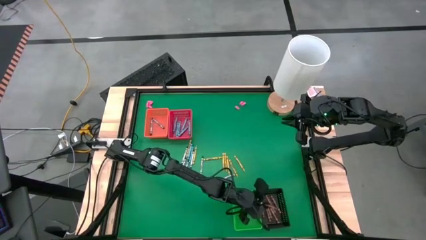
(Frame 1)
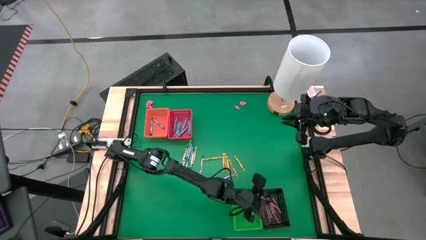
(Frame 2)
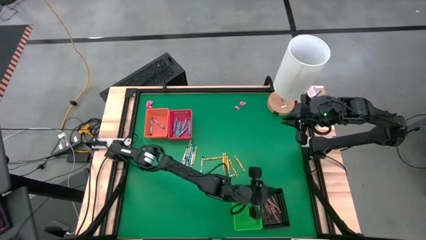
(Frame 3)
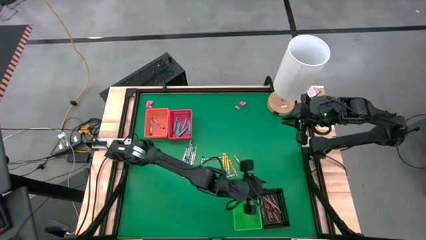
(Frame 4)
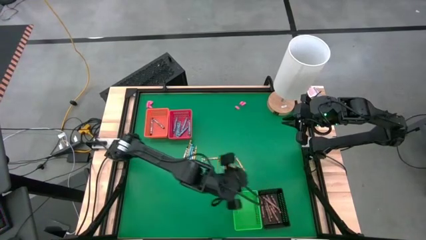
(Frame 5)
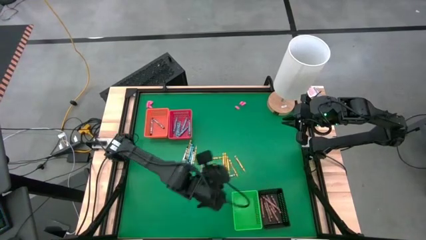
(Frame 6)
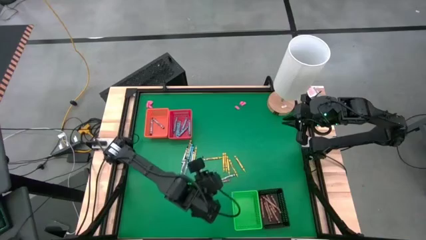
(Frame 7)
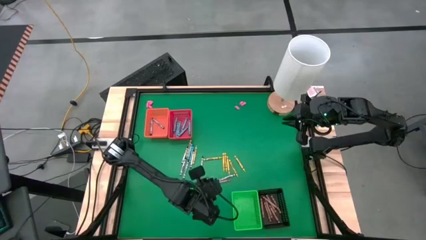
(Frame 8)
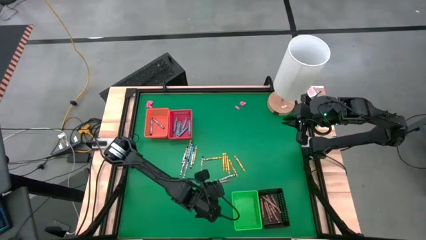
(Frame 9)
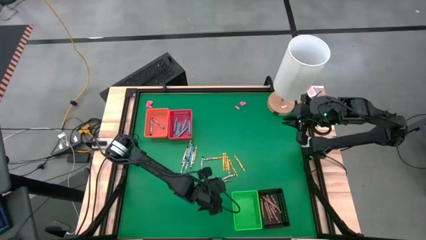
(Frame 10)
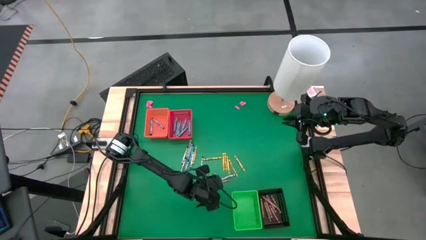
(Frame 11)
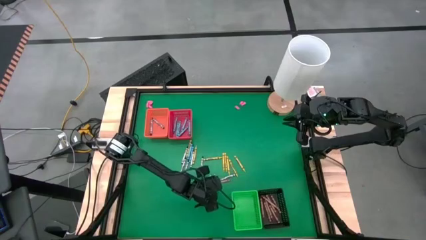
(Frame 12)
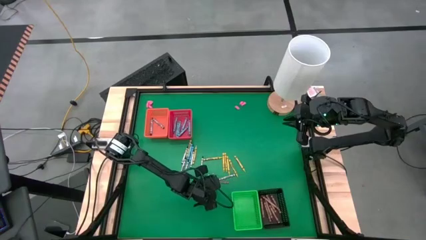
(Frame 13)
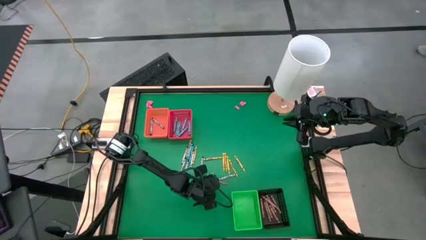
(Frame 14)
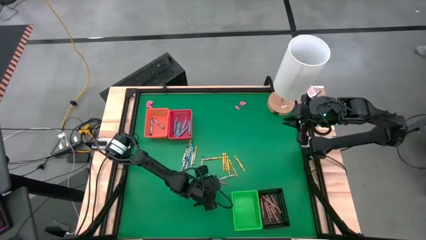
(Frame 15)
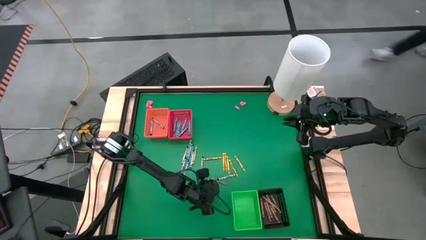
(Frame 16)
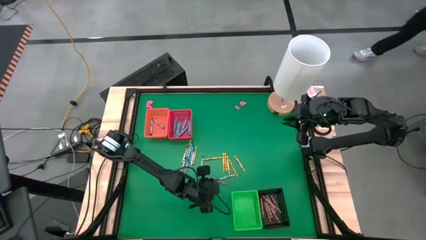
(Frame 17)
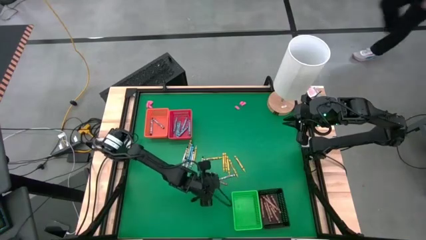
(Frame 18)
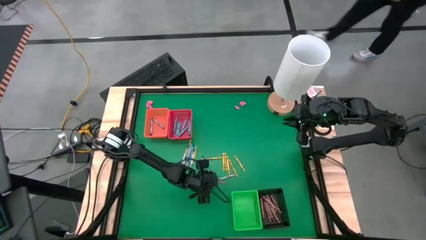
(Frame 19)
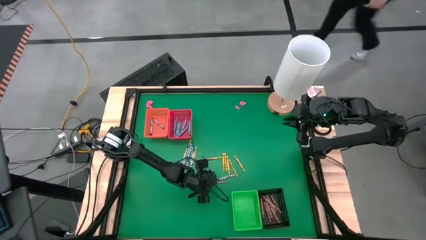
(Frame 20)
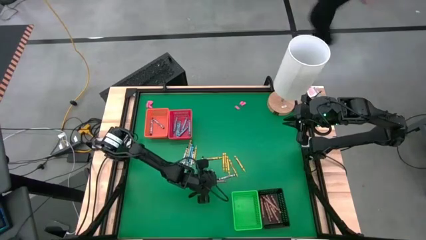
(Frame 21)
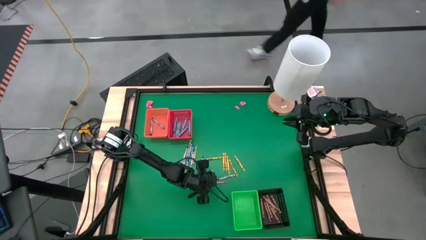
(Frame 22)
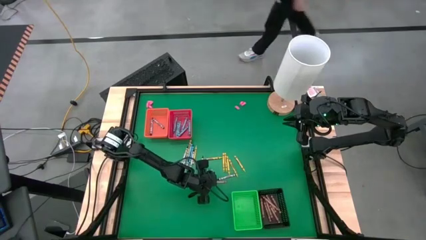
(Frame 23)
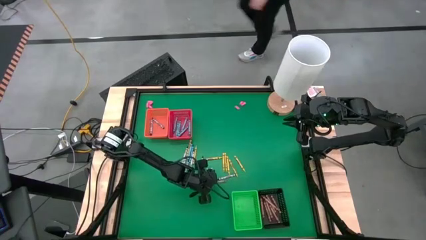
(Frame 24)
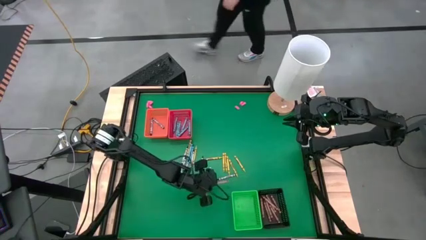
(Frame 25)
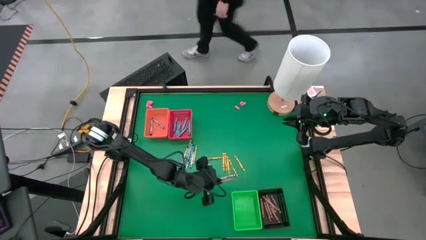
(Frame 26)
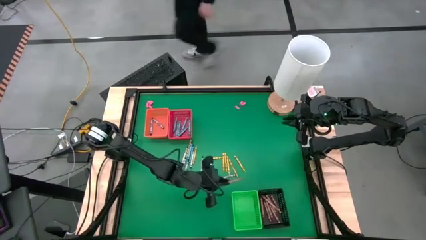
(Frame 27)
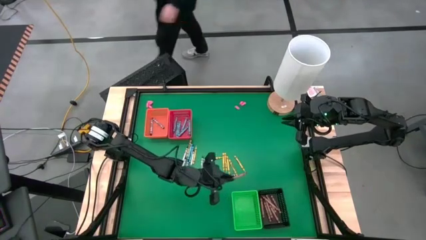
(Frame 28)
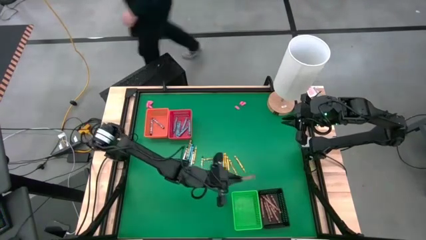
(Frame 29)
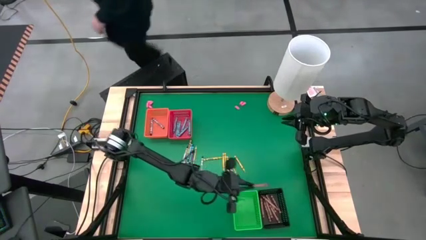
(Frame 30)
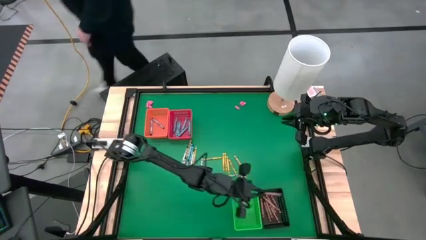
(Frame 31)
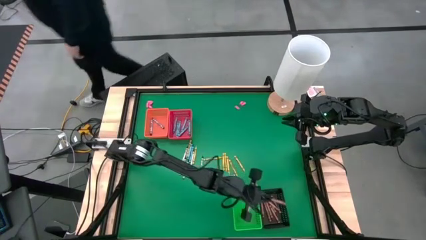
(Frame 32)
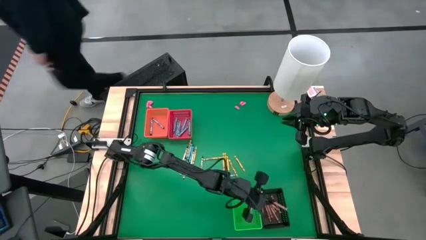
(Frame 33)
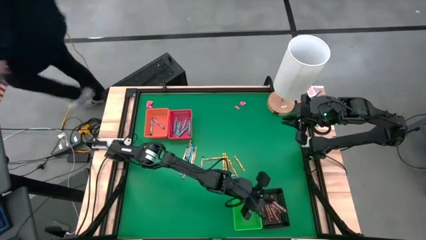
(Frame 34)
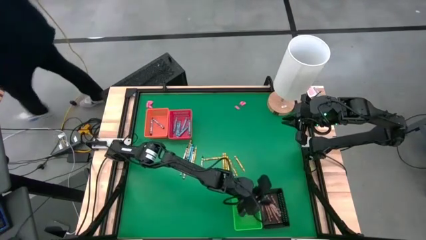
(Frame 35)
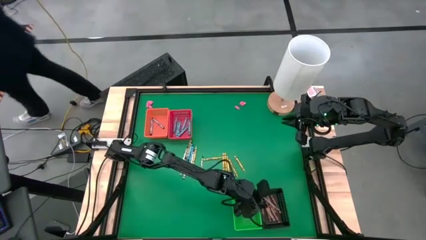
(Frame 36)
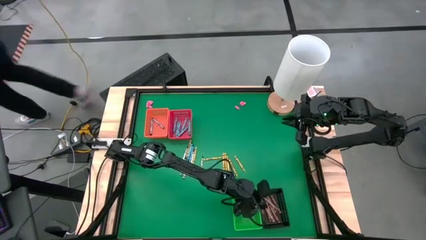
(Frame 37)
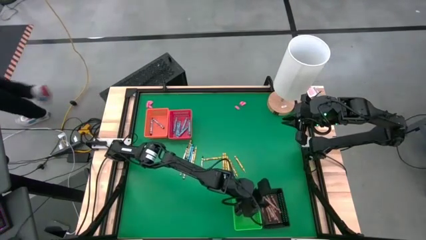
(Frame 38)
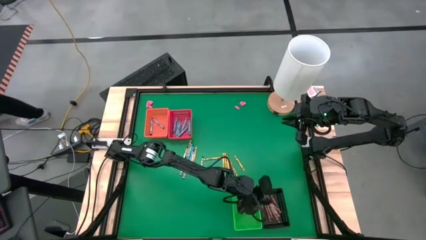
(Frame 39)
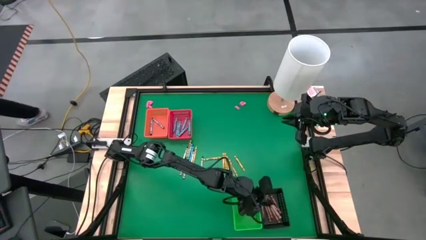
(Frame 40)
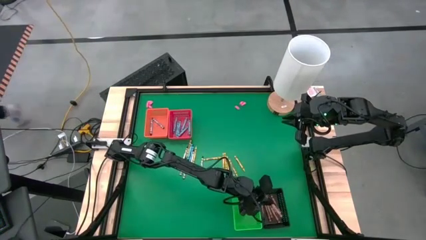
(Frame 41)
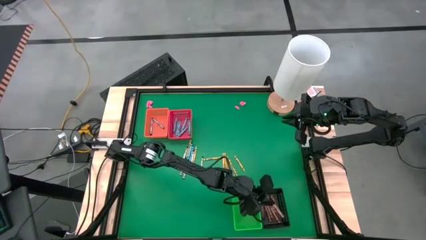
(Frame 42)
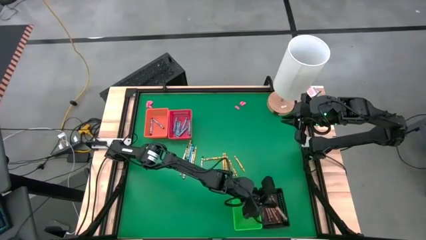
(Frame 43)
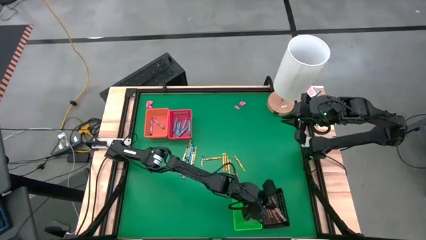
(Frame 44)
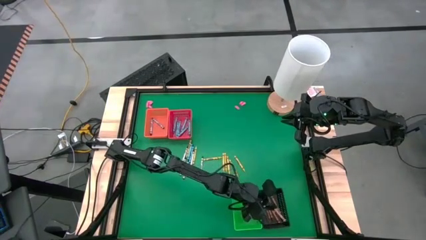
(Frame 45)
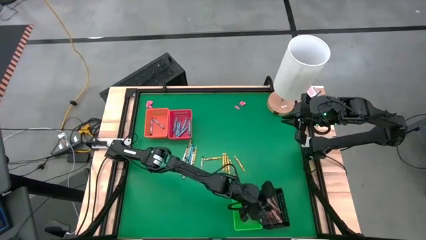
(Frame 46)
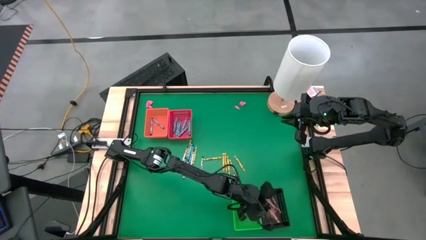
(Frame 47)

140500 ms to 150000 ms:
Task: Sort crayons
Put the brown crayon into the black bin

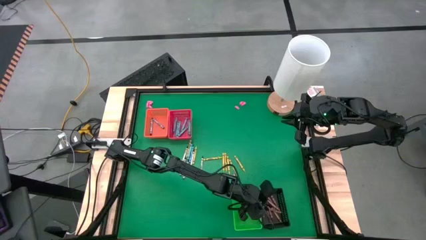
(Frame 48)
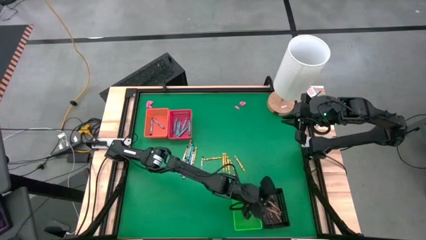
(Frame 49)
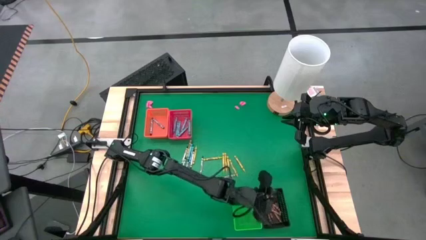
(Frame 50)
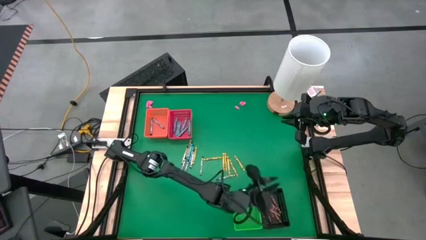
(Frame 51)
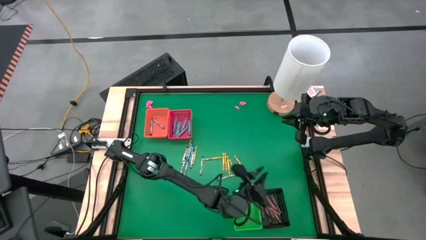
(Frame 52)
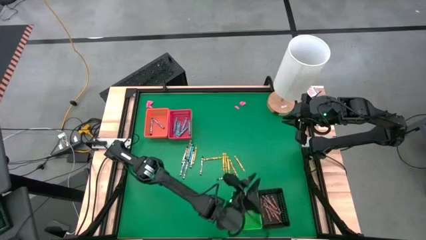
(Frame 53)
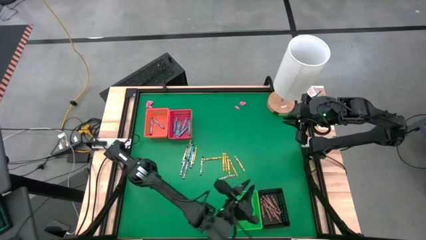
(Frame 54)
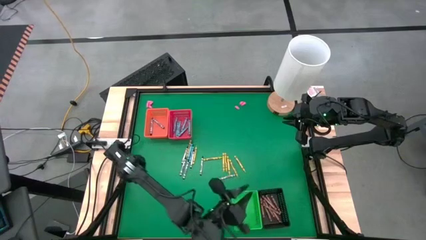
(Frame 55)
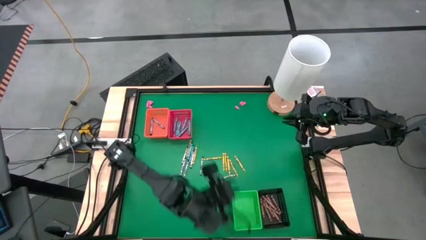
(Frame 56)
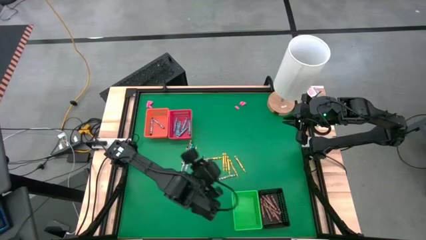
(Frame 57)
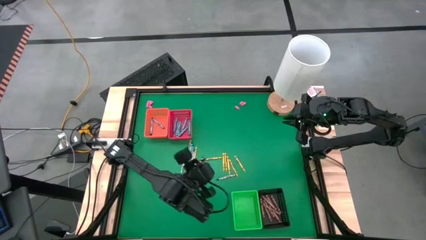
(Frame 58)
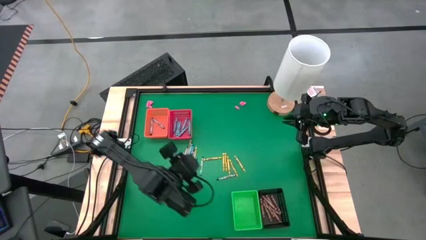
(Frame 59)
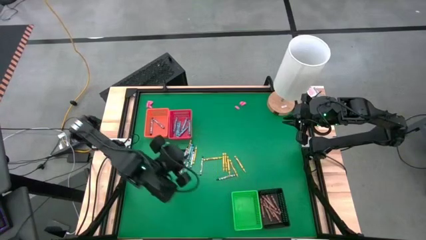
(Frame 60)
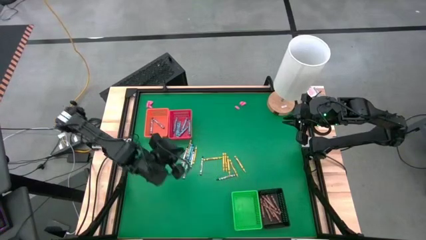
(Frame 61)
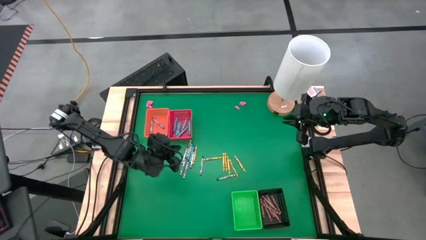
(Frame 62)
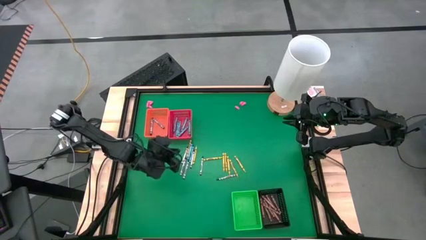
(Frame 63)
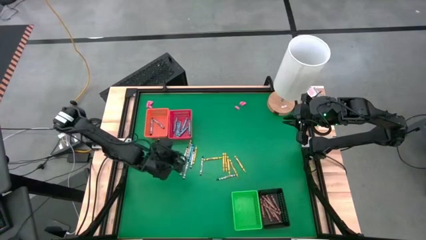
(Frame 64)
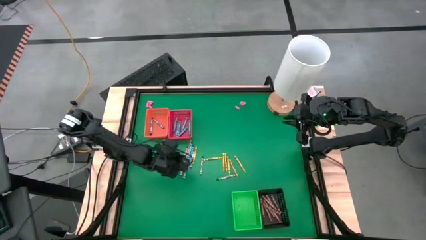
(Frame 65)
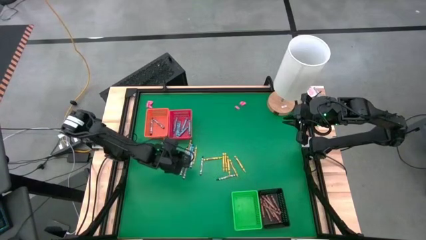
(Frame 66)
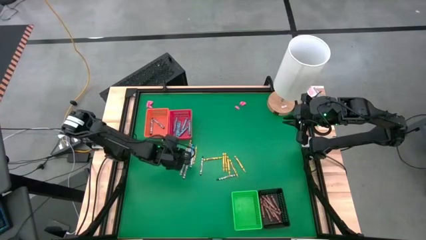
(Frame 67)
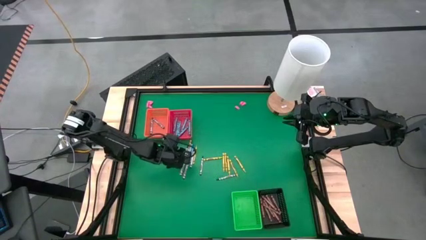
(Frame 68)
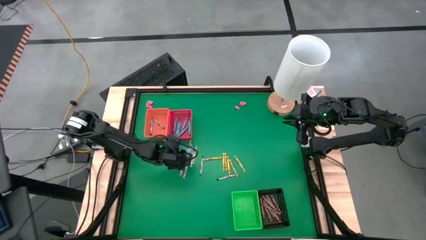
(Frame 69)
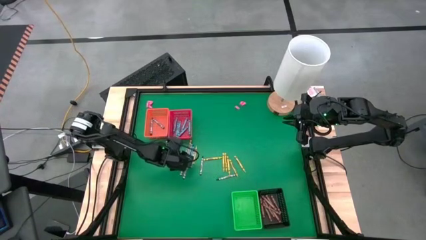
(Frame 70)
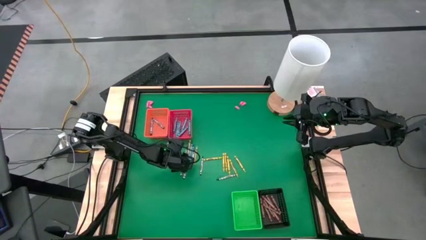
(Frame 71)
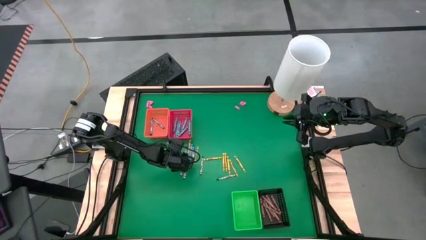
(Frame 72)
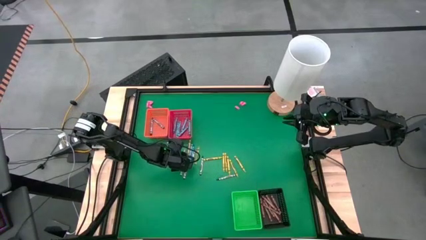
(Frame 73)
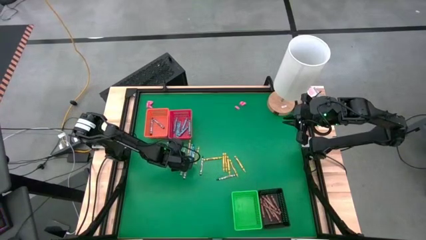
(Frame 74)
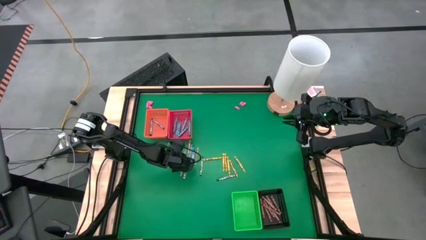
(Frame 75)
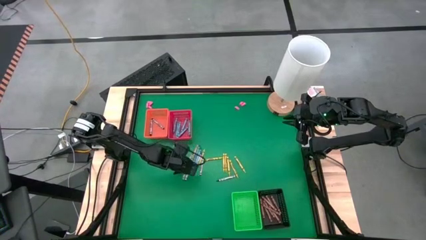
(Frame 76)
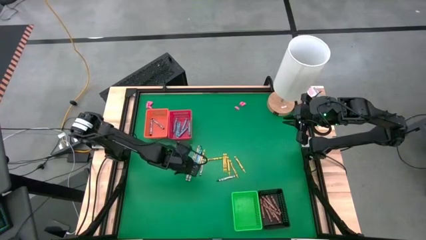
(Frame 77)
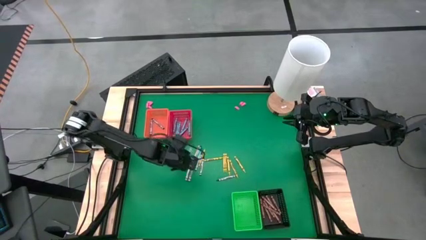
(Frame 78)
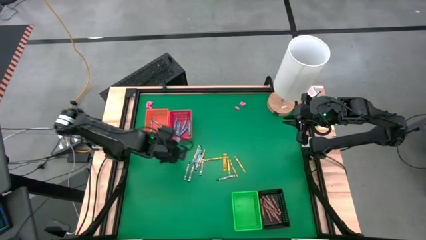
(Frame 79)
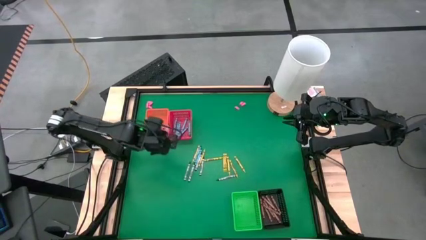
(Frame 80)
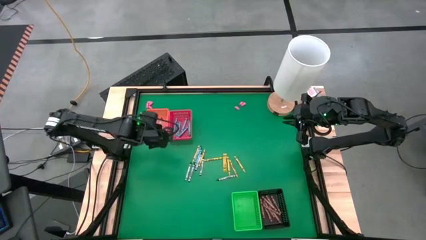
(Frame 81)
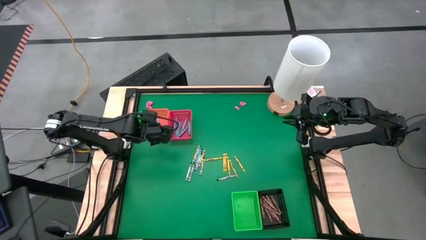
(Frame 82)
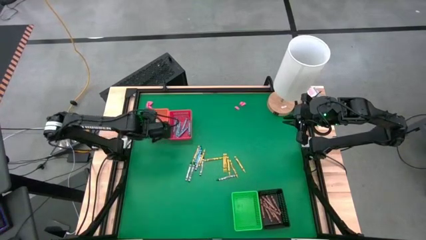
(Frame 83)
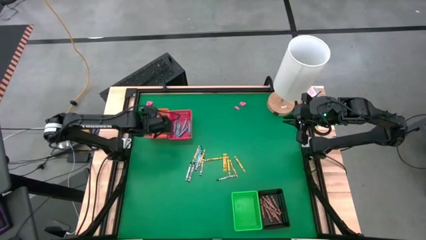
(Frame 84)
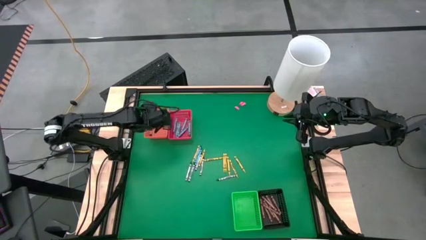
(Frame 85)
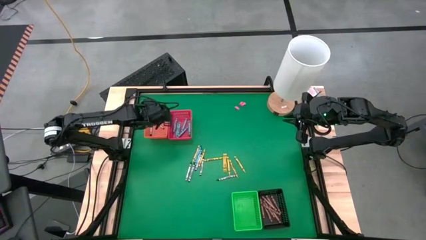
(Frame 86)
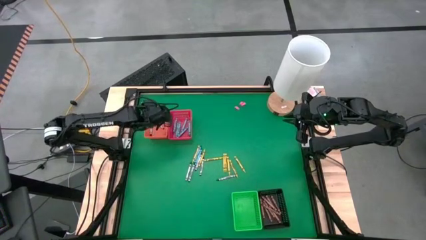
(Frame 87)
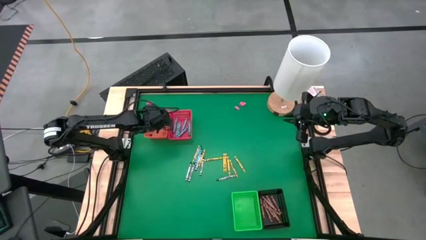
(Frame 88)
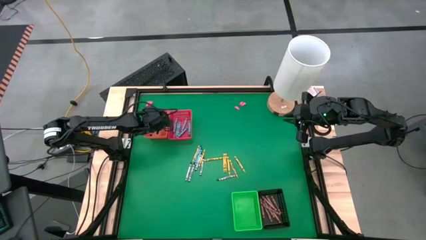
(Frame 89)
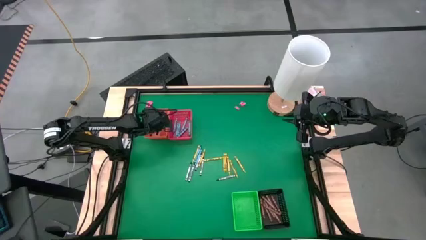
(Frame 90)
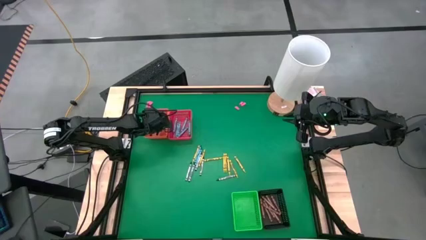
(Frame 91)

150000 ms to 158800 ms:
Put the black crayon into the orange bin
